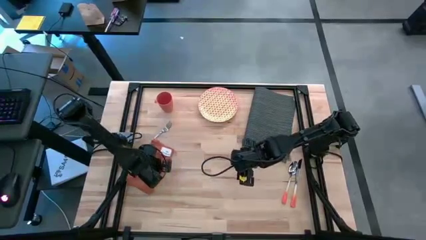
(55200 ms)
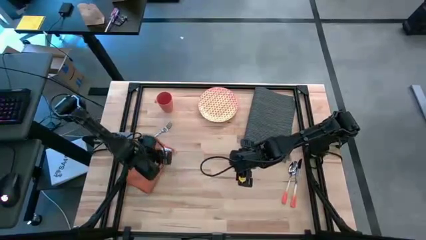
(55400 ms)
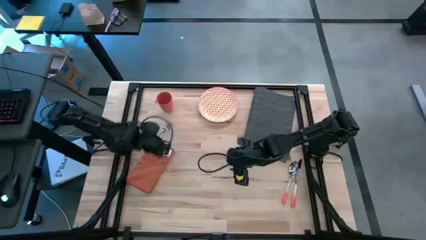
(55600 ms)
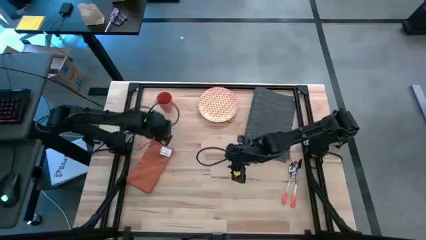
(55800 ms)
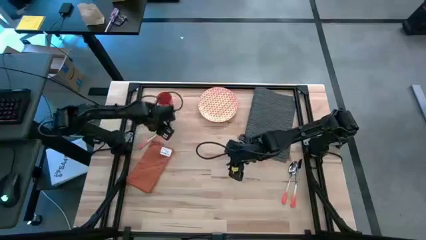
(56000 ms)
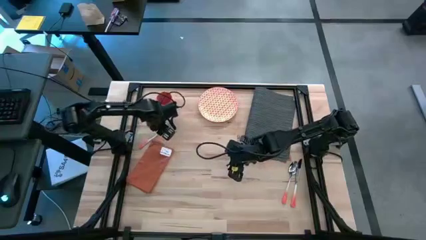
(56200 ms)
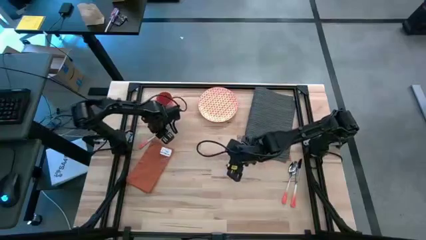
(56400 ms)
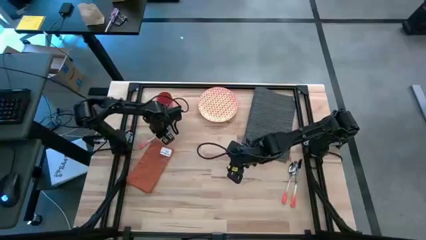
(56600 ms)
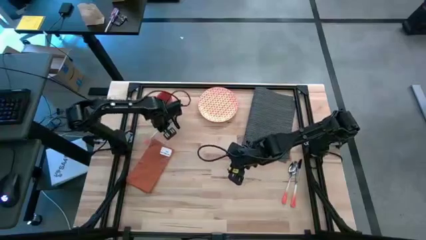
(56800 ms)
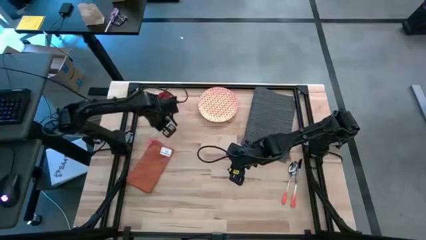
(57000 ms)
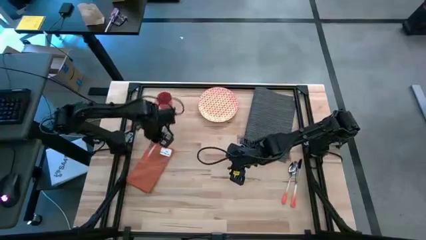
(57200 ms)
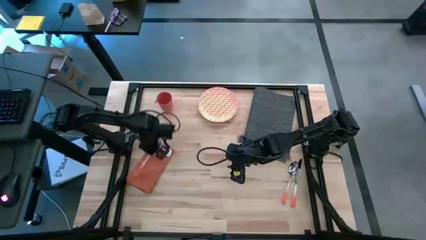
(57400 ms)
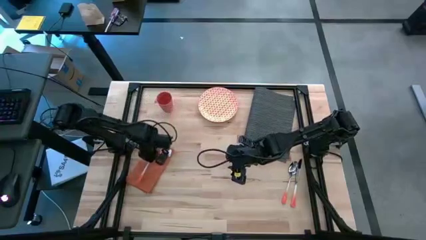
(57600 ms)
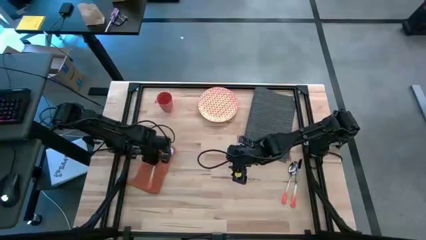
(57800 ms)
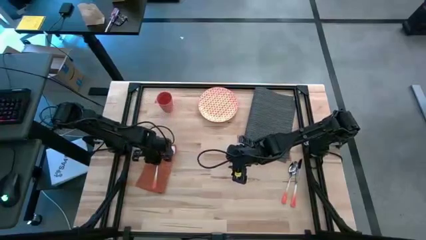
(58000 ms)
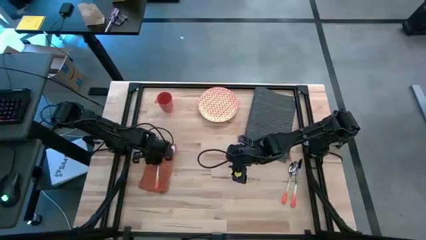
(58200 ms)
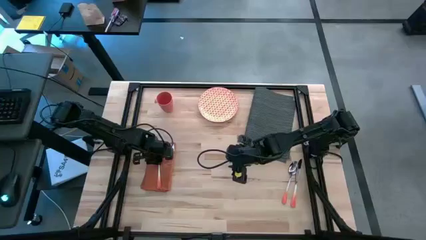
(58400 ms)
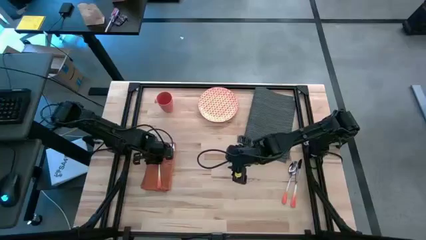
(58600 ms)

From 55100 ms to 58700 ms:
Task: Set table place
Put the orange fork on the orange table napkin

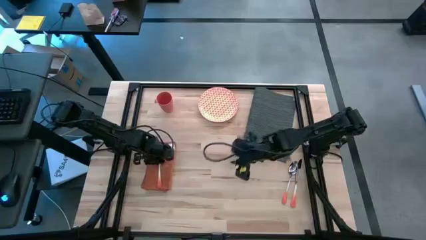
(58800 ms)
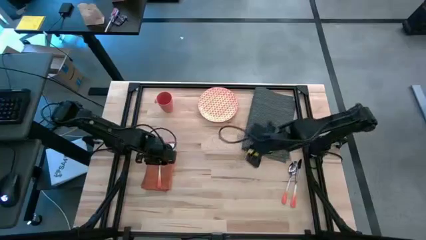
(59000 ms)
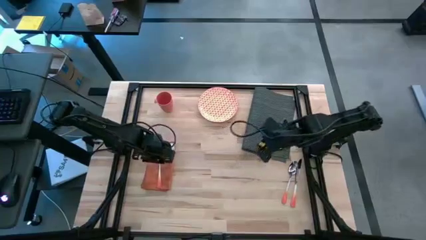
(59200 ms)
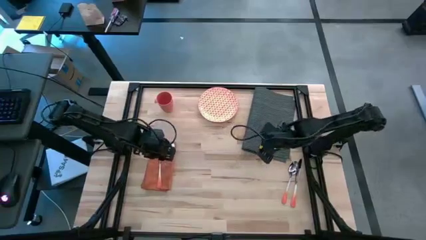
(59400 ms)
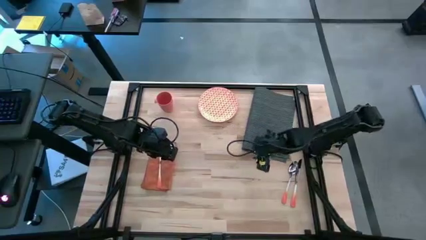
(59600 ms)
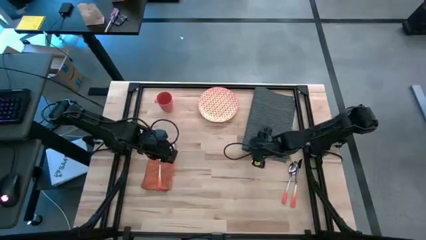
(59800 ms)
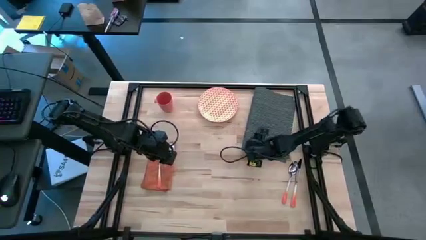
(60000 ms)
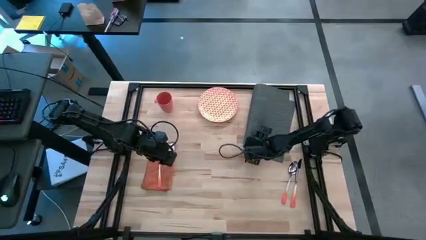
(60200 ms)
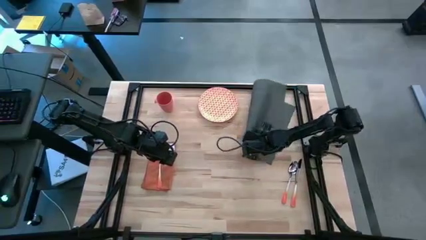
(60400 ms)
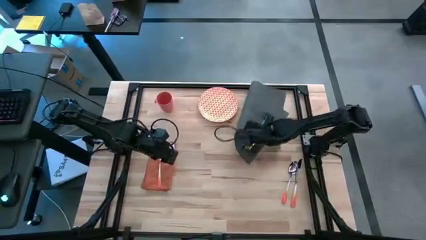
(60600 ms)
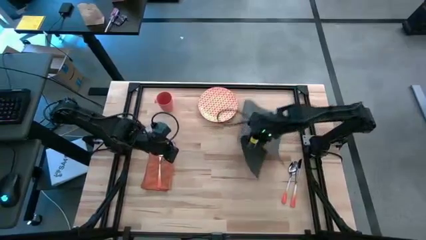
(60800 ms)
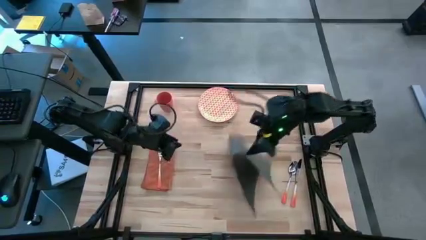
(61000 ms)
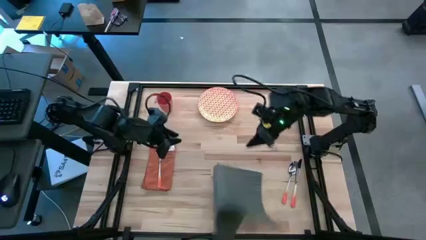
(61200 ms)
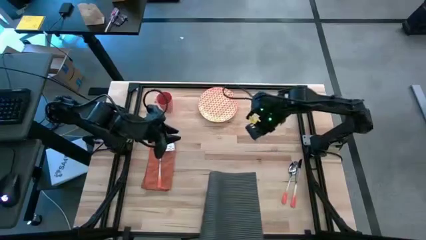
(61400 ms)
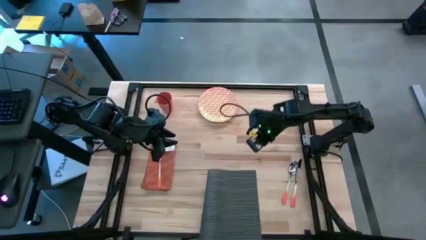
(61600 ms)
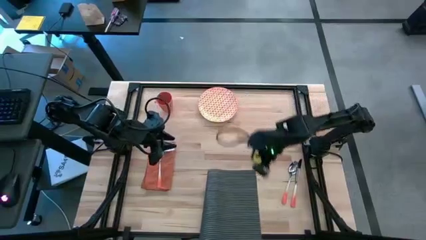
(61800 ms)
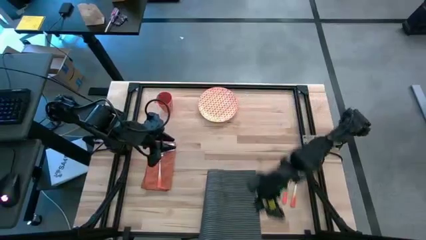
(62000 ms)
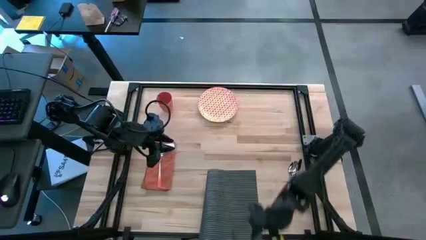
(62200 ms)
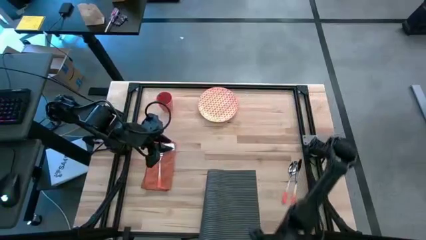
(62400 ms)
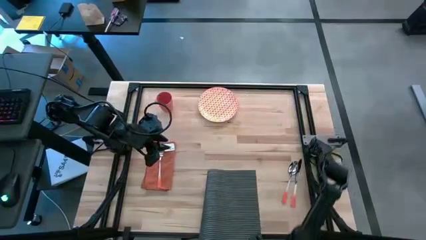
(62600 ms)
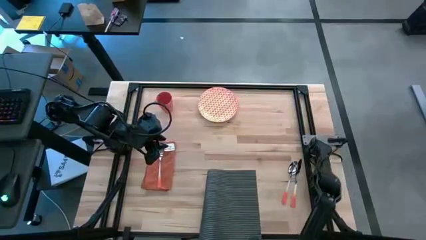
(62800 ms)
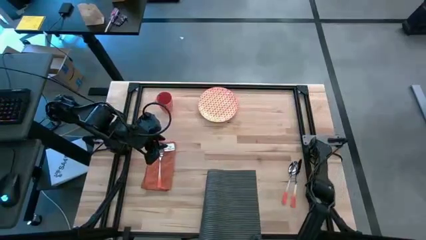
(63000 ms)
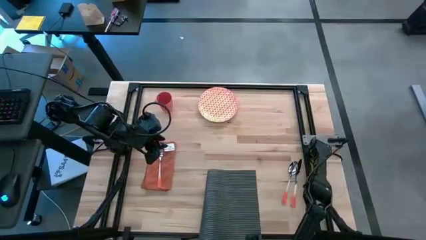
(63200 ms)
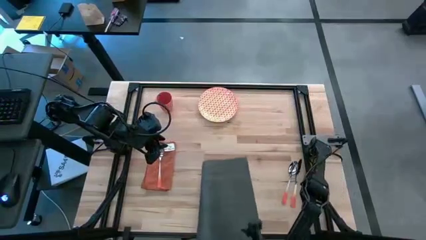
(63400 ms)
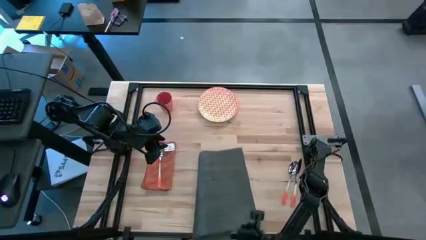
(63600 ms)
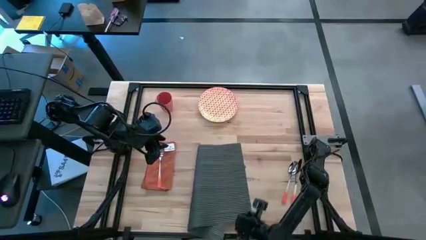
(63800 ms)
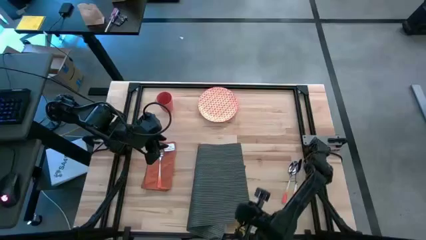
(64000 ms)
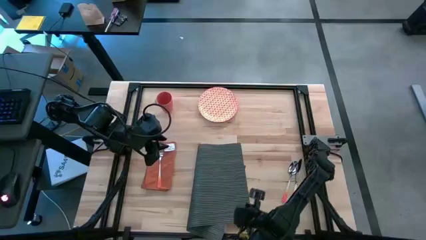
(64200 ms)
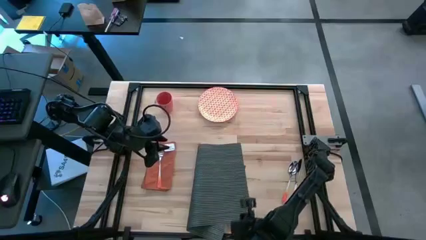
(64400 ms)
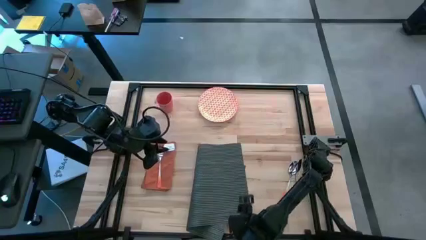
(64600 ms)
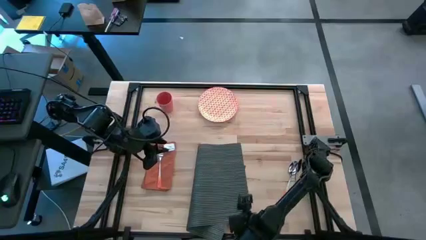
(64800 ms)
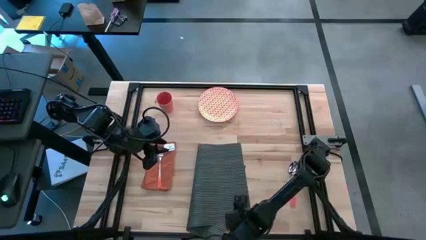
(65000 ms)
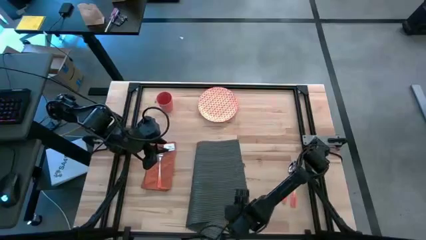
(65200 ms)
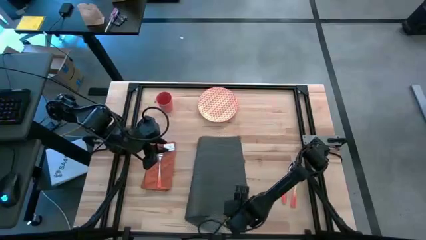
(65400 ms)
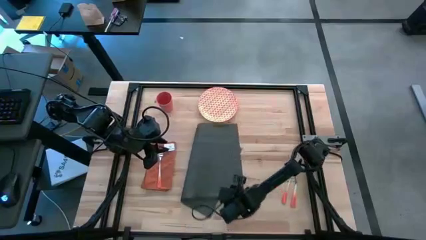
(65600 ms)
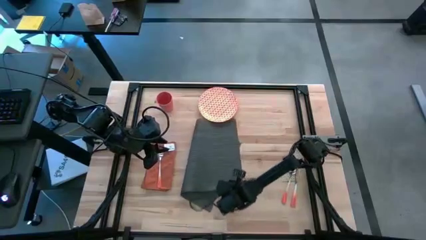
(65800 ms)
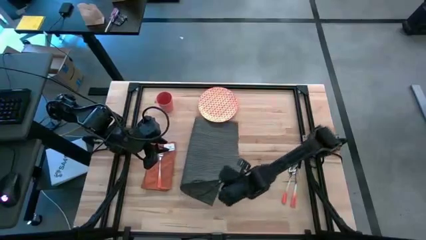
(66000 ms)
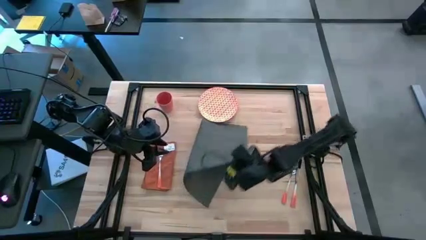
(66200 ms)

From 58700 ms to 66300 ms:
Put the gray placemat to the center of the table

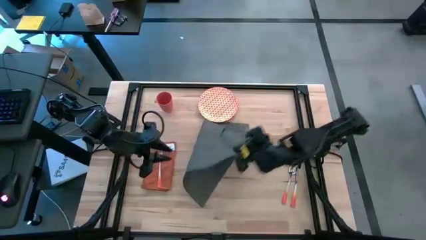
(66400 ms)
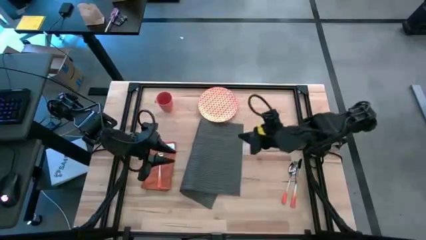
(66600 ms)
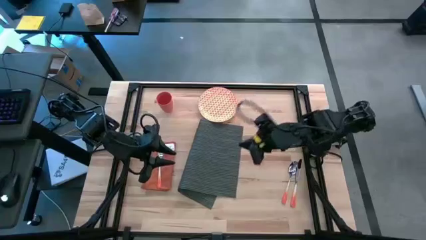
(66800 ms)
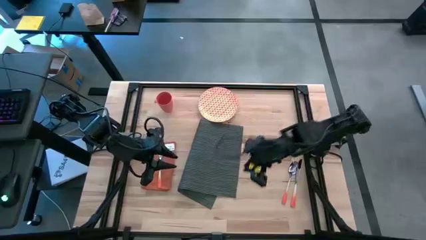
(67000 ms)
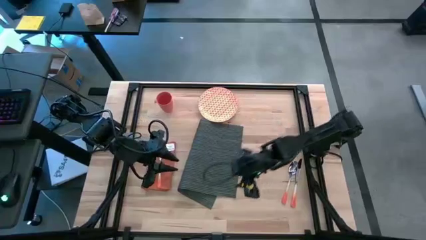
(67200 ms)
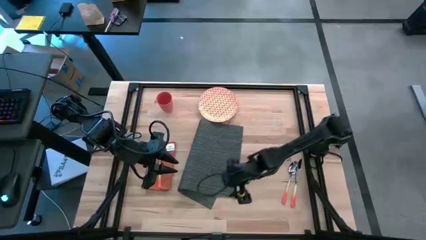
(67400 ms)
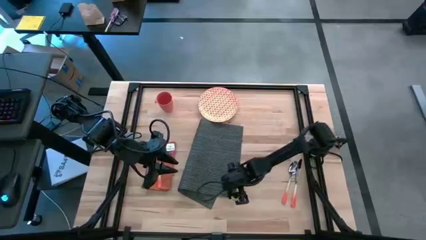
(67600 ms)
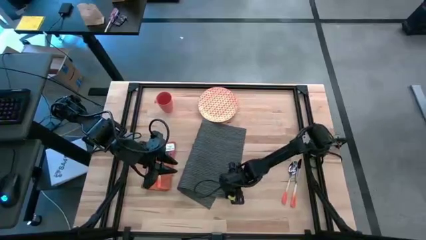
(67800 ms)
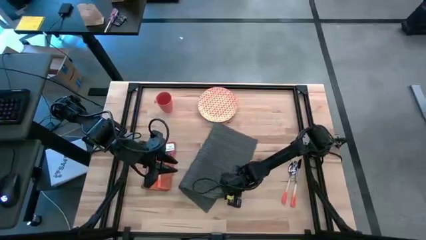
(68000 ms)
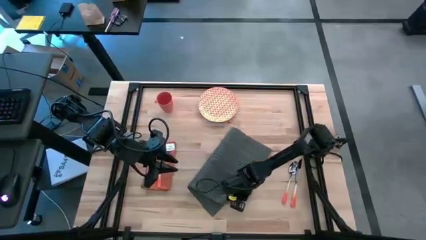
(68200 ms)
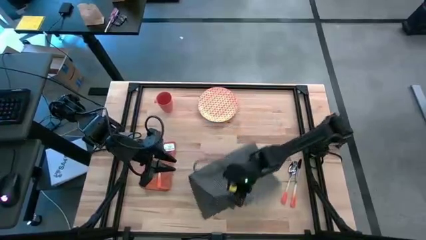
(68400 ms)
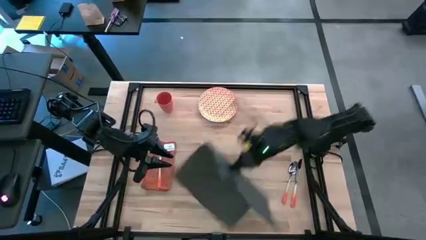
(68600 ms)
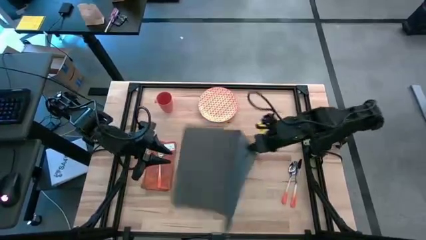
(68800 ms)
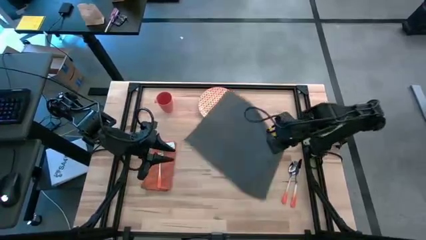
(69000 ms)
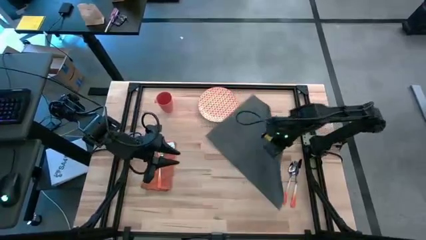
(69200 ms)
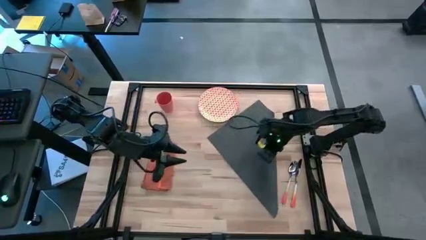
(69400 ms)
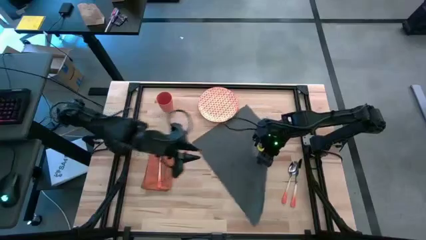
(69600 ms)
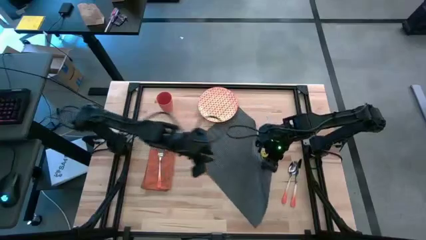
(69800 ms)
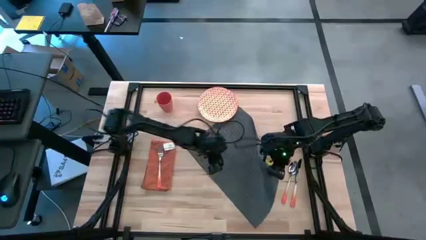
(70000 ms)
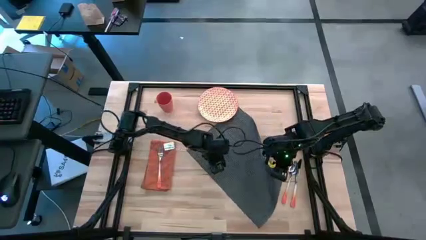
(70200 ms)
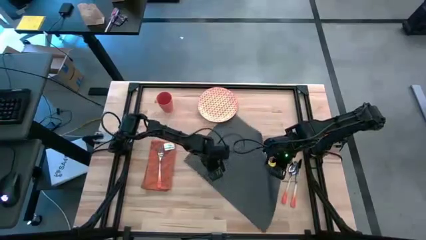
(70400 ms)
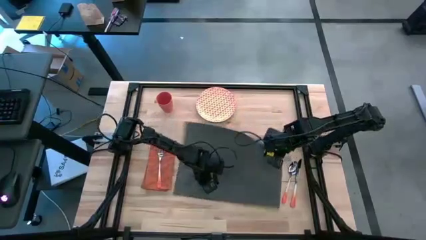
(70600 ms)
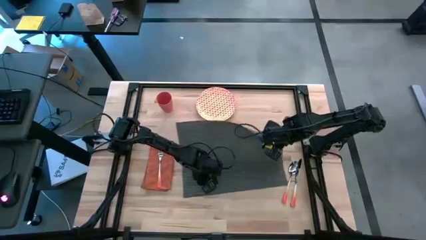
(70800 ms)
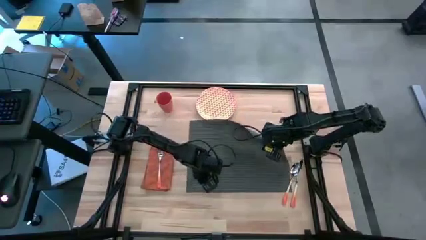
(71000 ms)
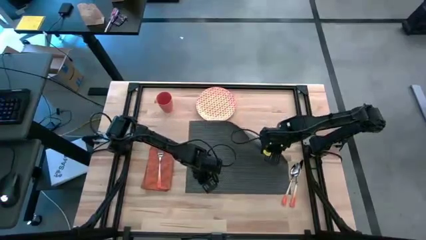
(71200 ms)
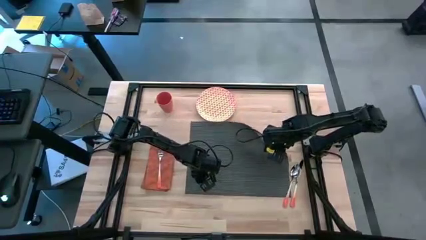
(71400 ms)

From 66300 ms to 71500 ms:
Put the gray placemat to the center of the table

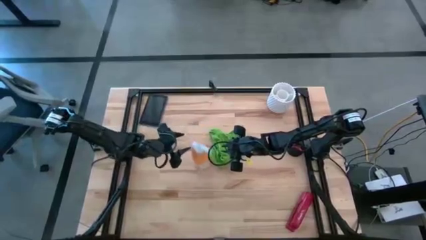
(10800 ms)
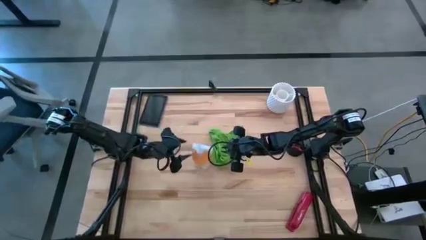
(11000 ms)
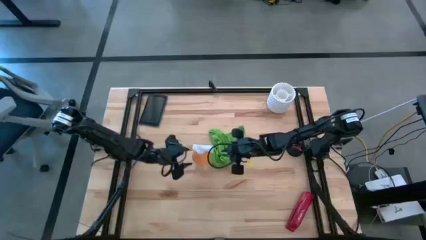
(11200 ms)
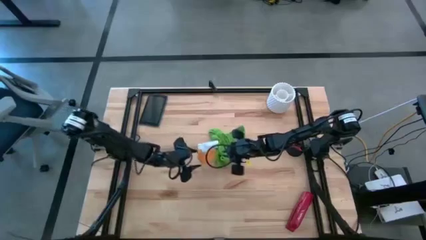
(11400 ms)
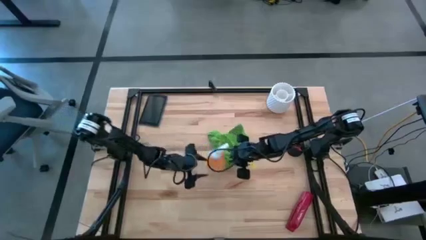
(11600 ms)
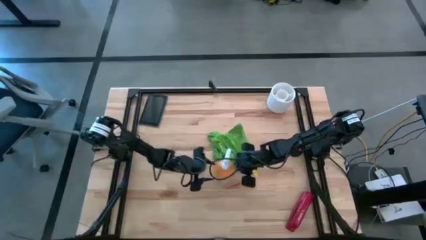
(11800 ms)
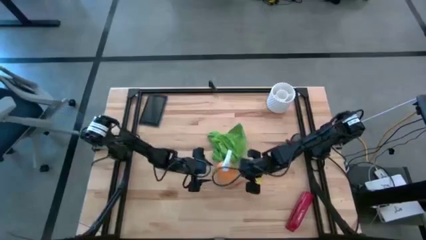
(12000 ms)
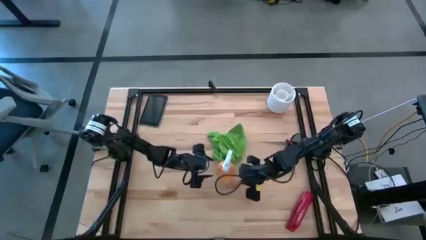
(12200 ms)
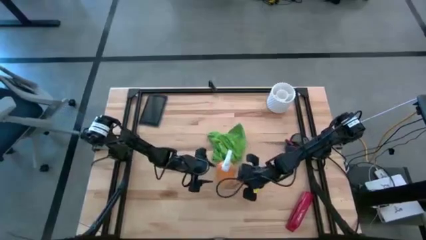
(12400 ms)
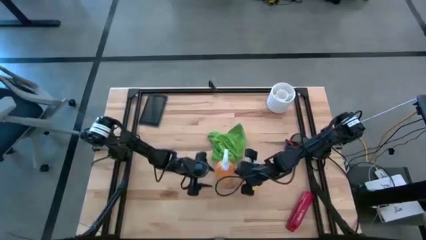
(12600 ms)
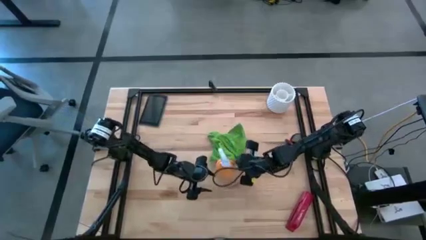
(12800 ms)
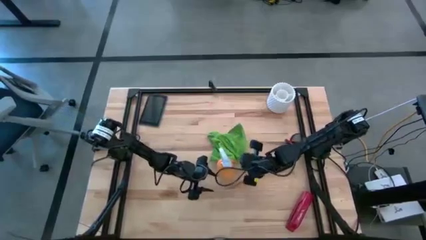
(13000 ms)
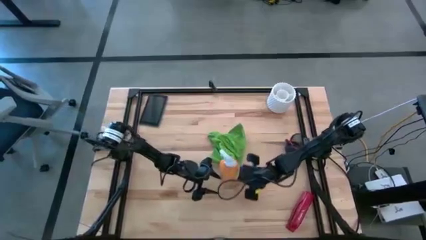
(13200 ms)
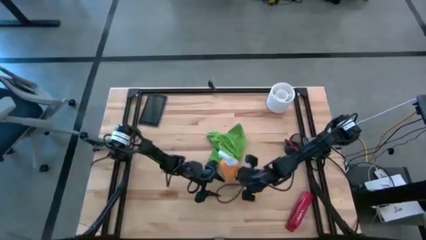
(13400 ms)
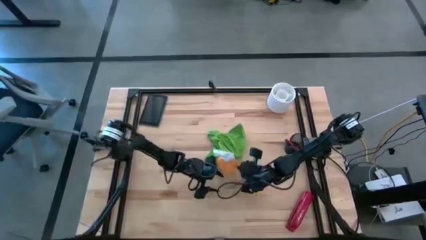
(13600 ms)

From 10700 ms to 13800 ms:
Task: Apply microfiber cloth
Prepare the spray cleaning bottle
